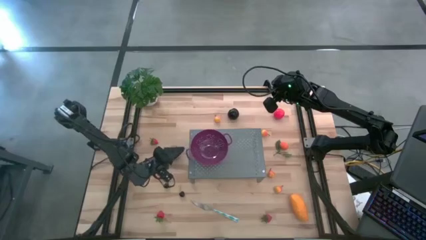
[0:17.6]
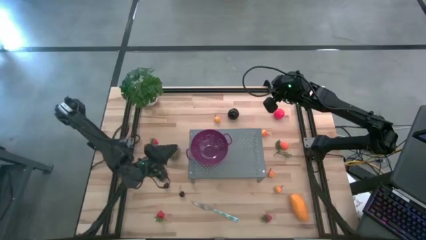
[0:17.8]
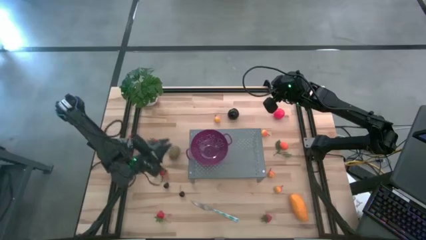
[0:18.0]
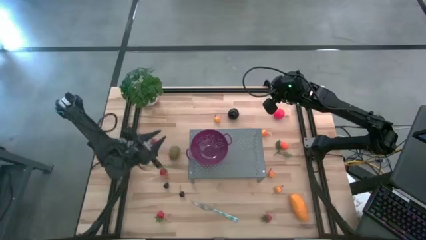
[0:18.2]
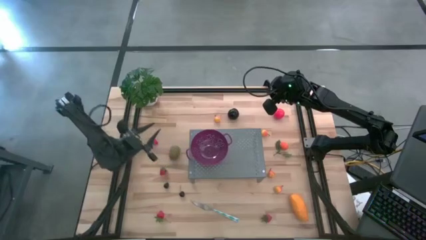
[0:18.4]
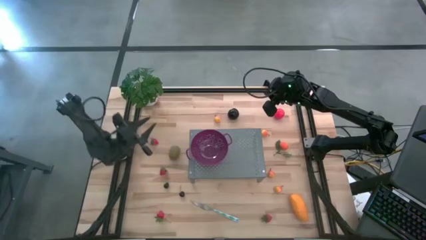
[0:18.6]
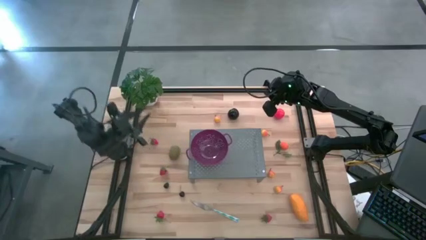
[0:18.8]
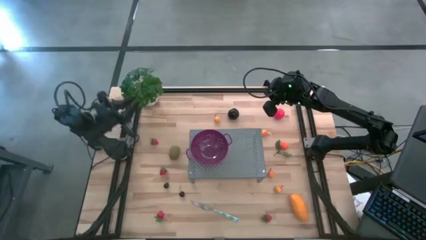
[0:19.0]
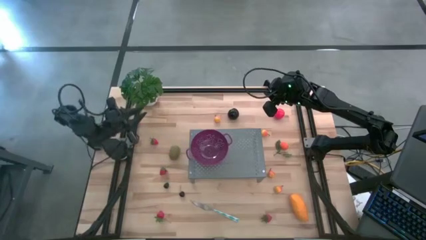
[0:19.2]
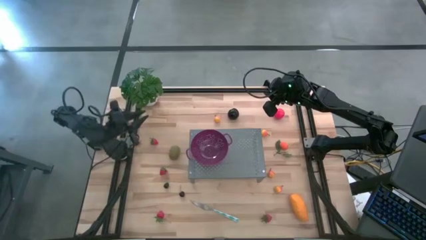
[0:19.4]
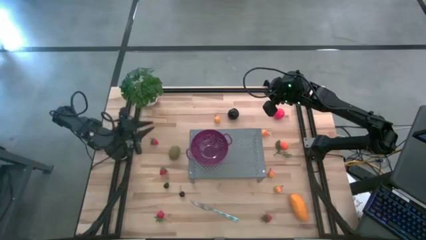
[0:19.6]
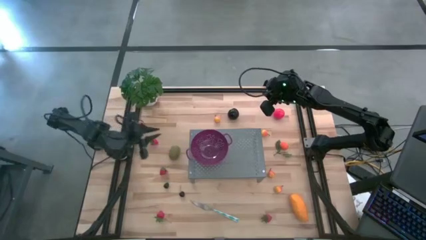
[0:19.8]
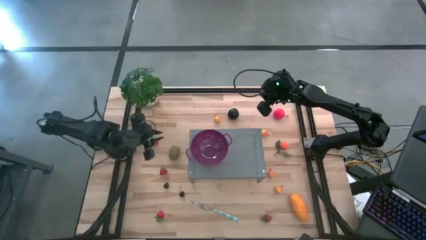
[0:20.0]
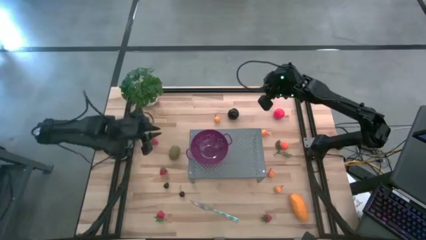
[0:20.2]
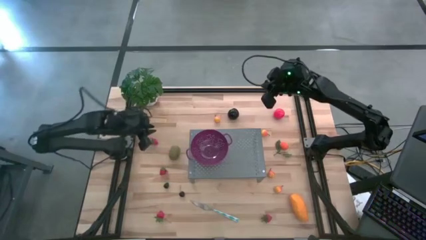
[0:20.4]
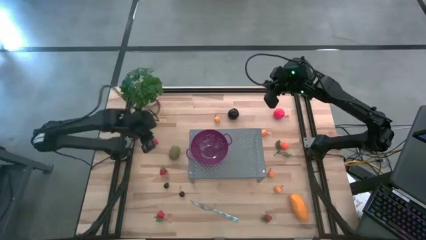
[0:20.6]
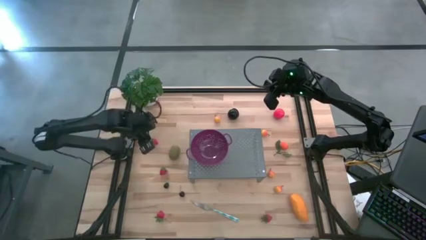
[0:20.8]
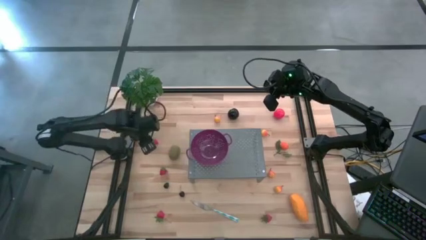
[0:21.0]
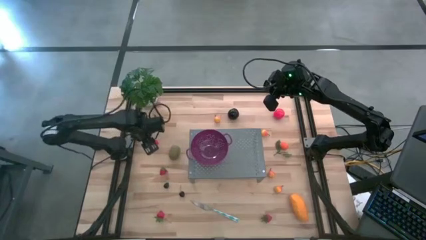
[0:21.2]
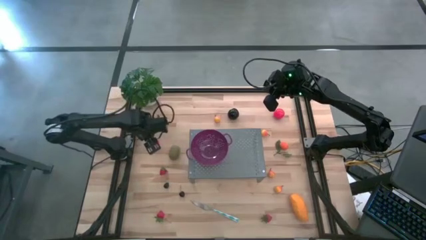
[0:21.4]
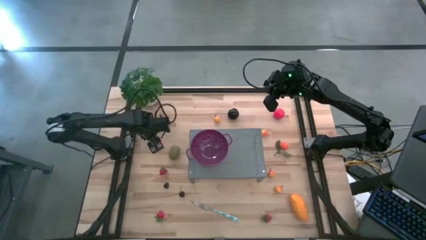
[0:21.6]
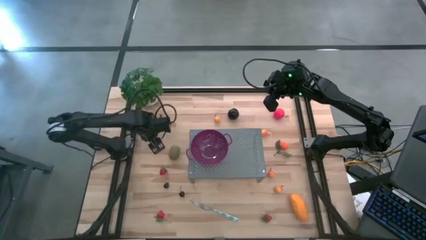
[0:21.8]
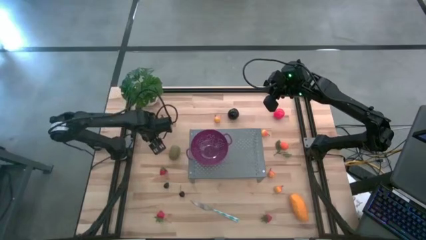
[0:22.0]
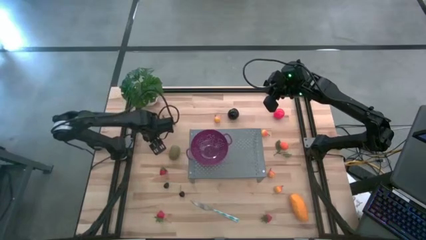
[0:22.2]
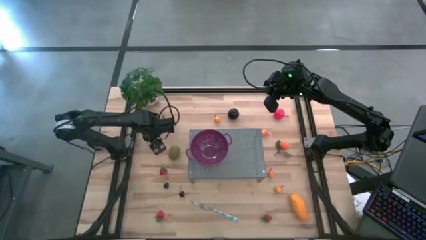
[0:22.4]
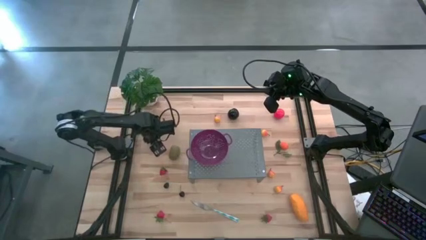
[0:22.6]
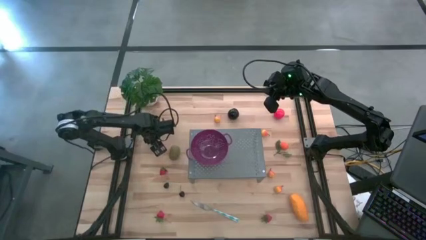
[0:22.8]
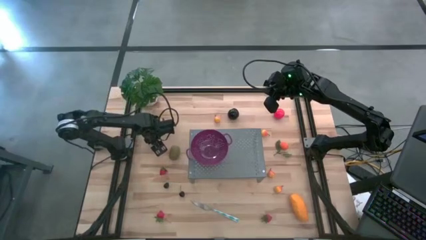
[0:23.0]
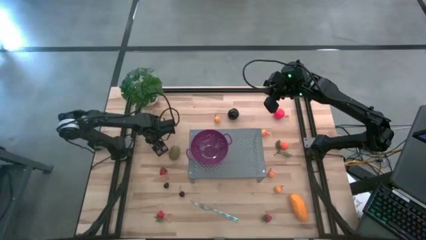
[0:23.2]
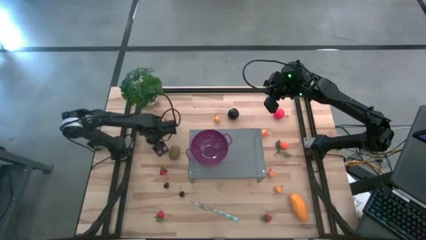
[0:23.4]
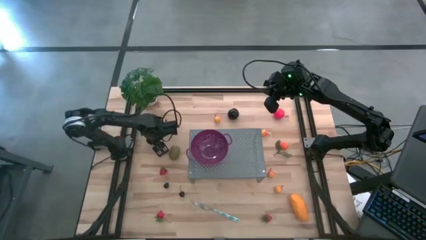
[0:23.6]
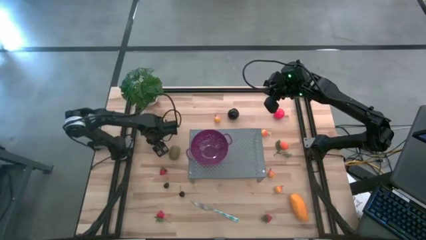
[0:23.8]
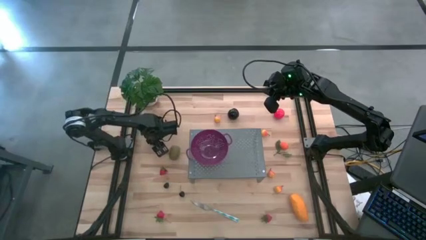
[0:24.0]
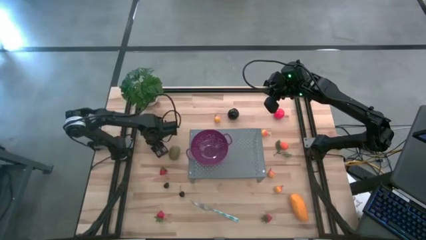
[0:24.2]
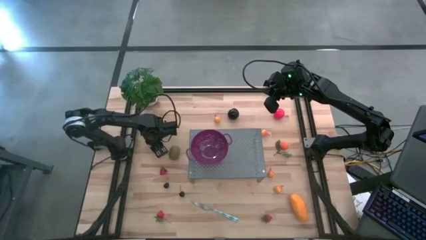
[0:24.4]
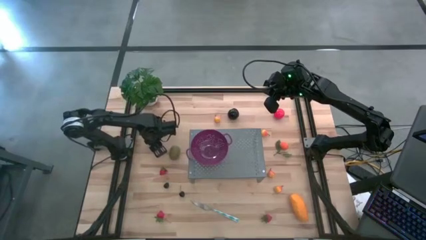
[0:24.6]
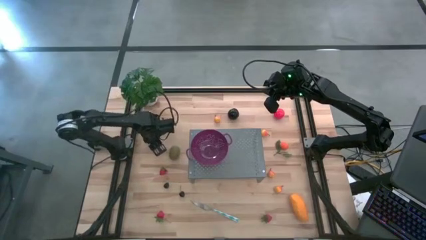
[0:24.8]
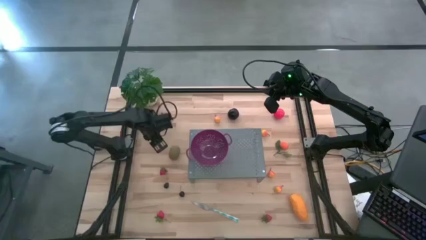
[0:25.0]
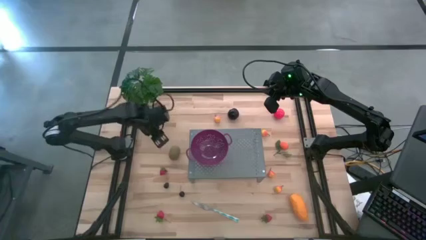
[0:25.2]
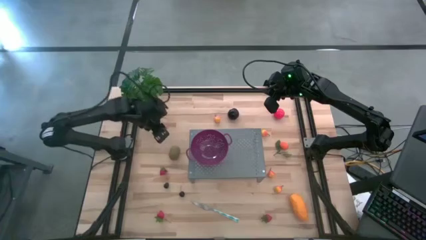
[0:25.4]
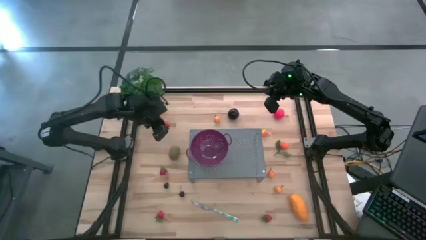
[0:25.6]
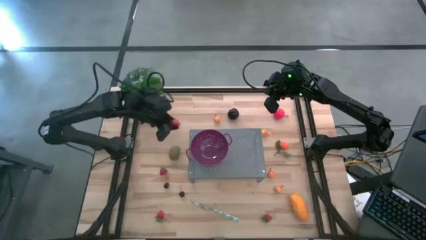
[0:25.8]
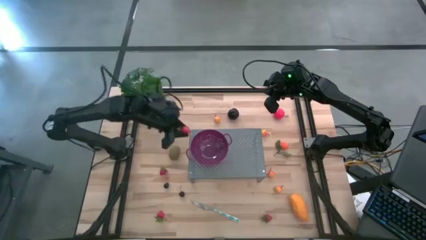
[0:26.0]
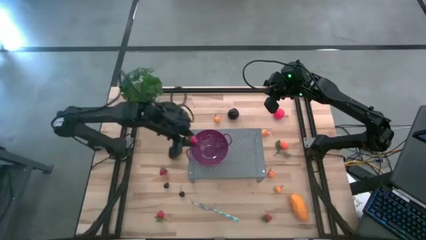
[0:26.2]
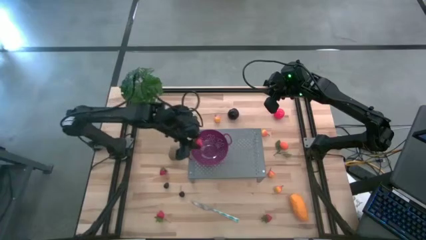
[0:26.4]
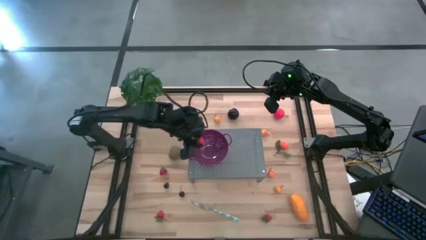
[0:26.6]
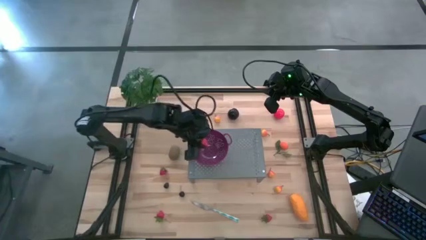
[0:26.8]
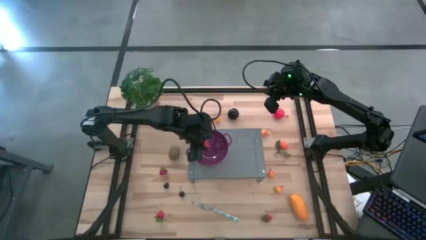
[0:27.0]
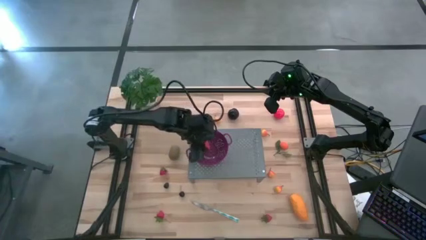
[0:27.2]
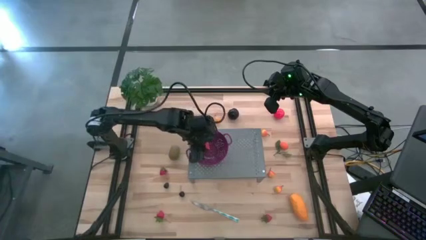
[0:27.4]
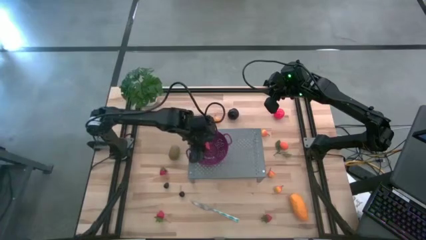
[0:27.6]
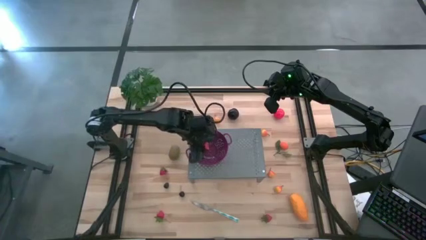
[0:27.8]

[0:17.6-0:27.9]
Task: Pick & Place Fruit
Put the strawberry into the purple strainer bowl
